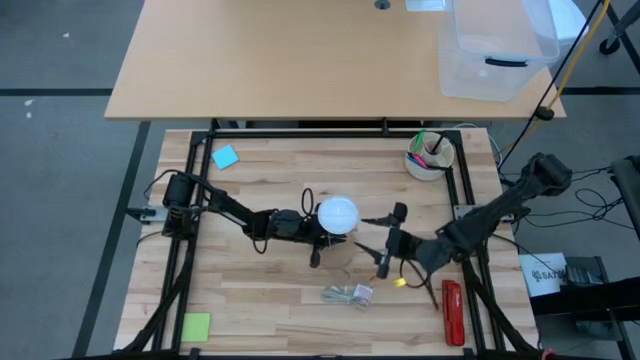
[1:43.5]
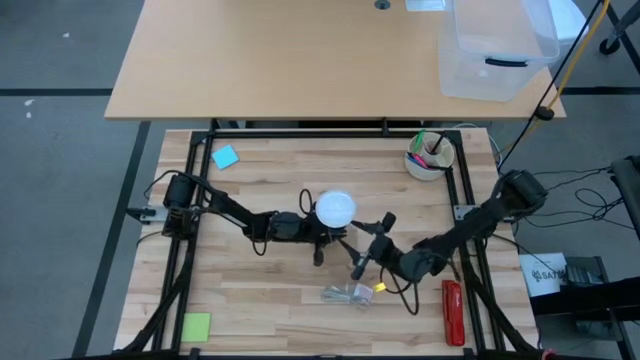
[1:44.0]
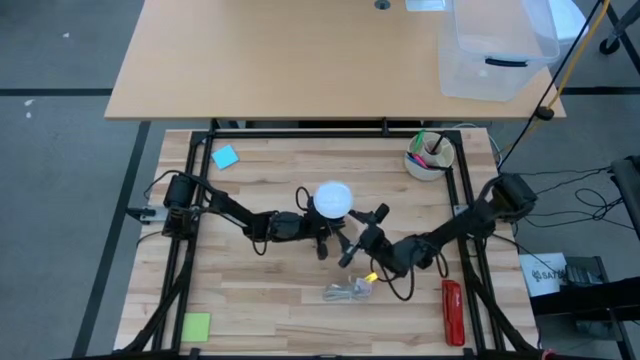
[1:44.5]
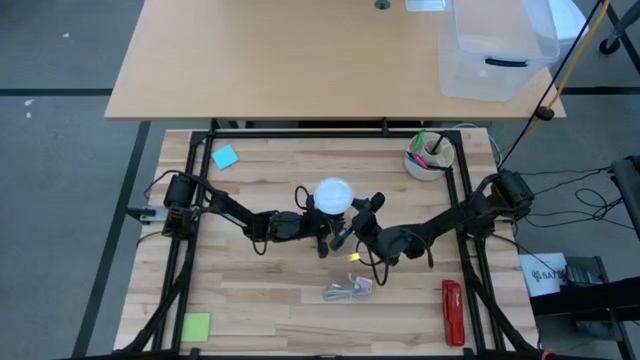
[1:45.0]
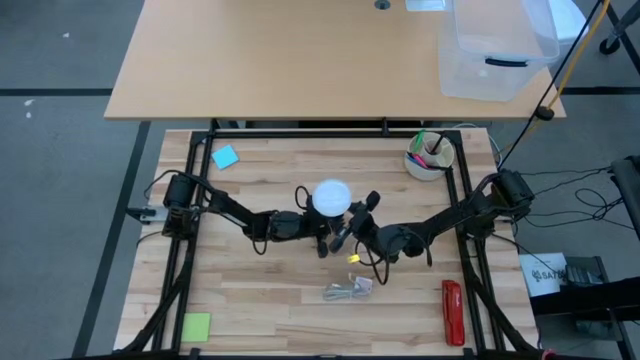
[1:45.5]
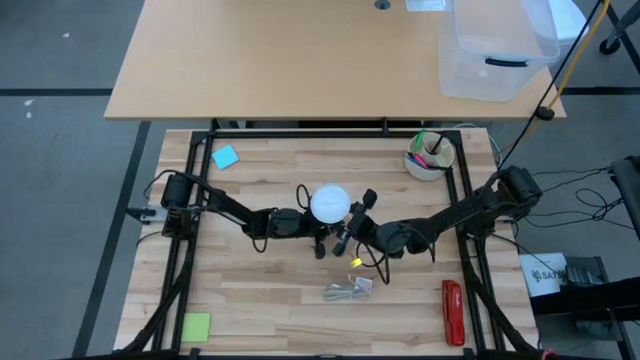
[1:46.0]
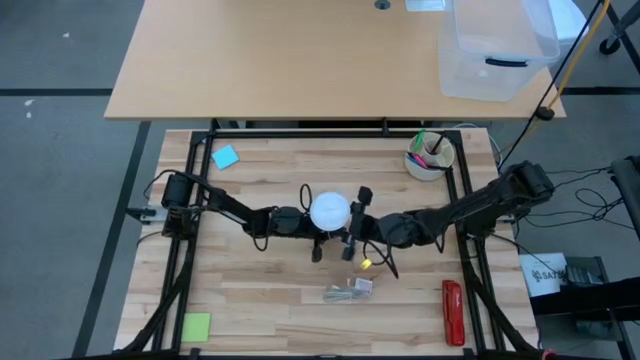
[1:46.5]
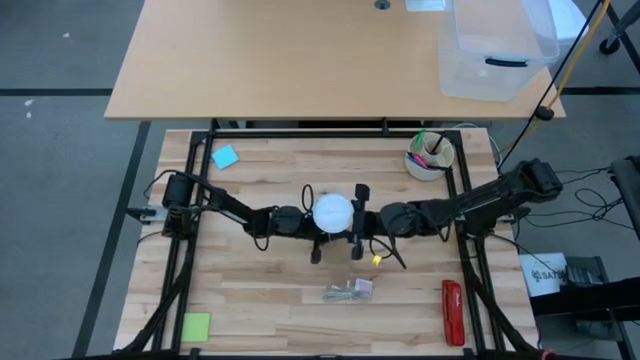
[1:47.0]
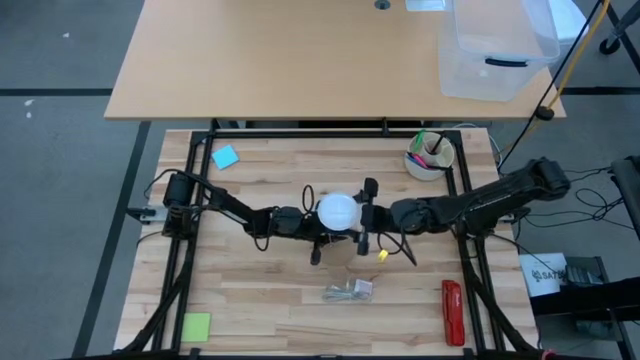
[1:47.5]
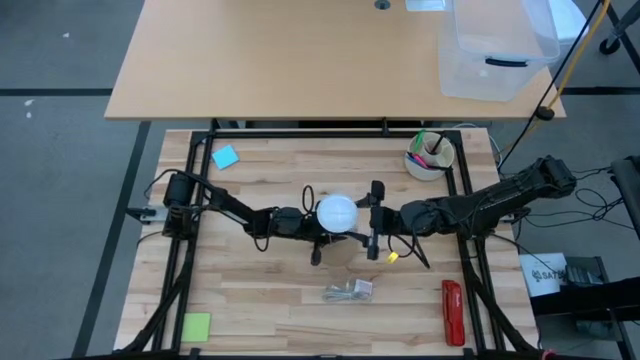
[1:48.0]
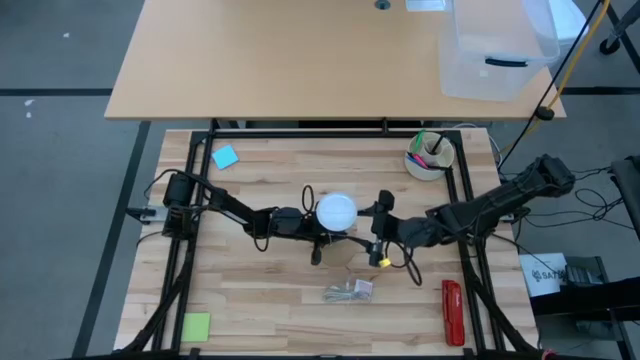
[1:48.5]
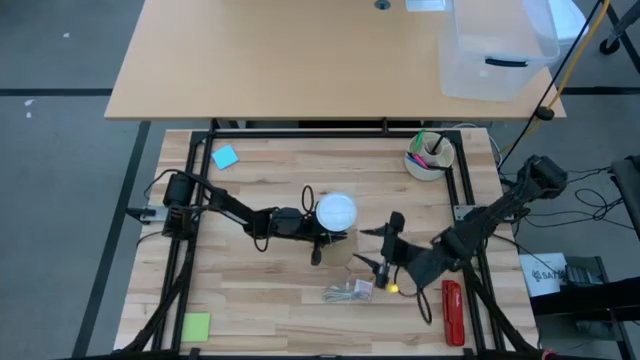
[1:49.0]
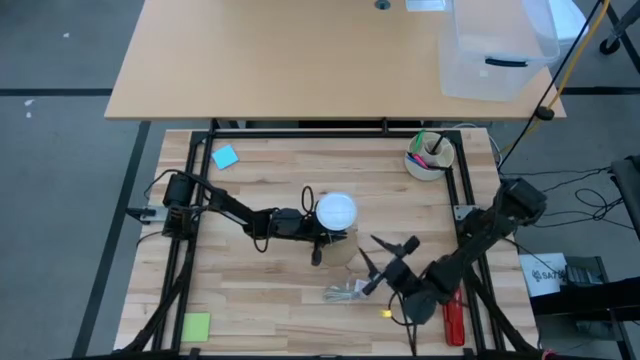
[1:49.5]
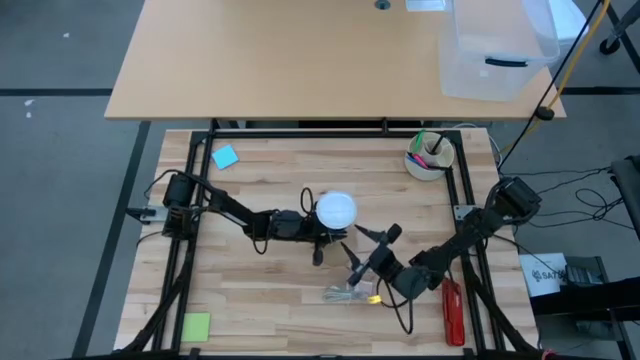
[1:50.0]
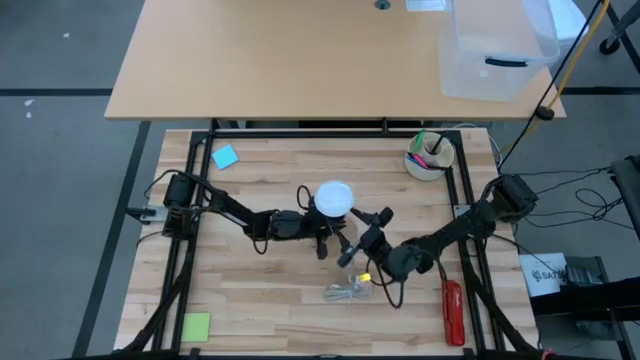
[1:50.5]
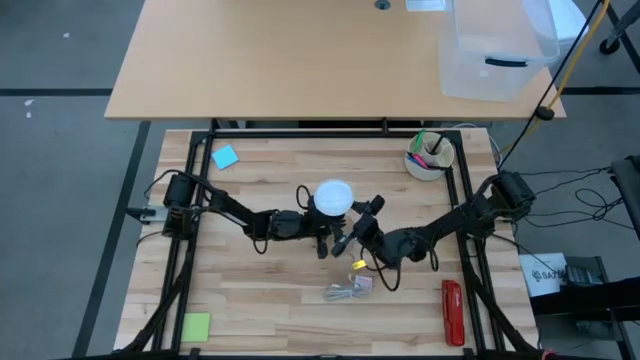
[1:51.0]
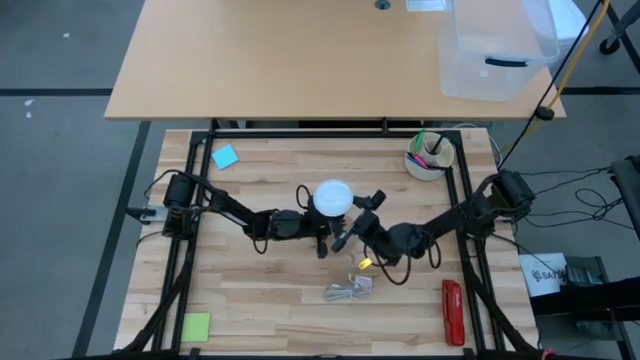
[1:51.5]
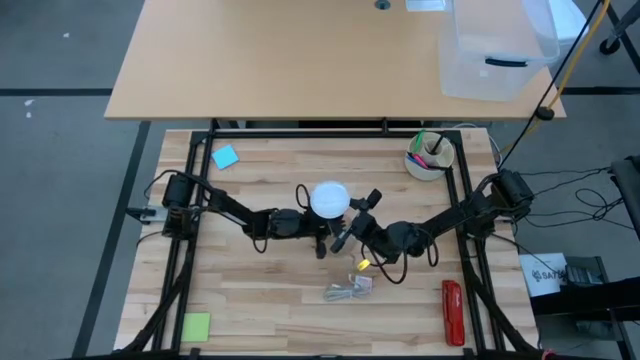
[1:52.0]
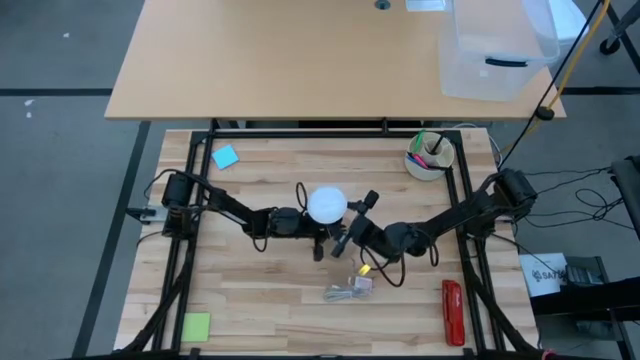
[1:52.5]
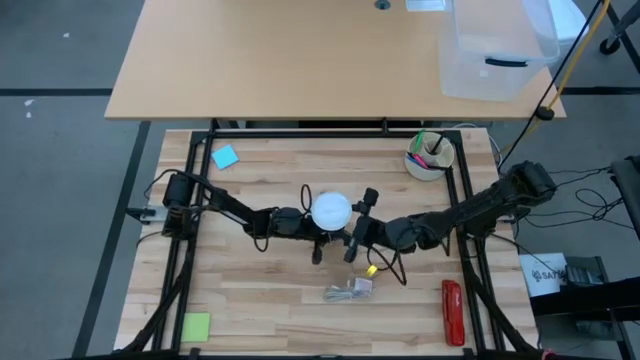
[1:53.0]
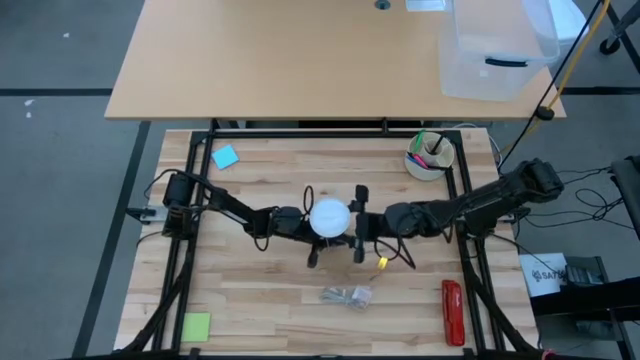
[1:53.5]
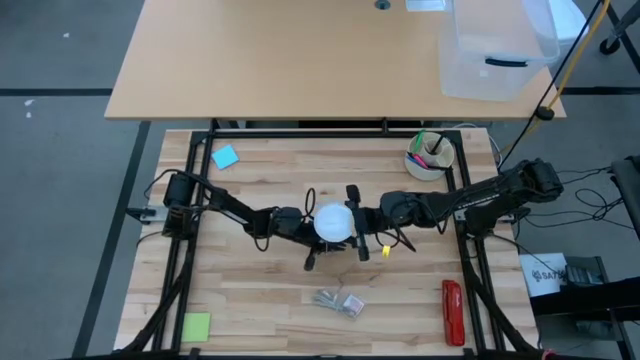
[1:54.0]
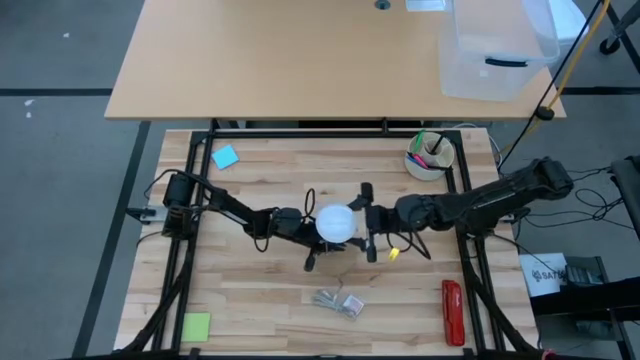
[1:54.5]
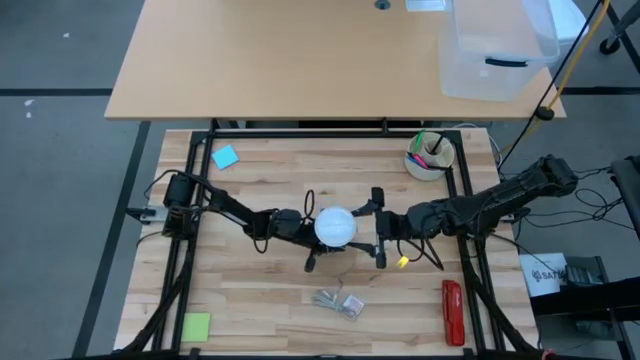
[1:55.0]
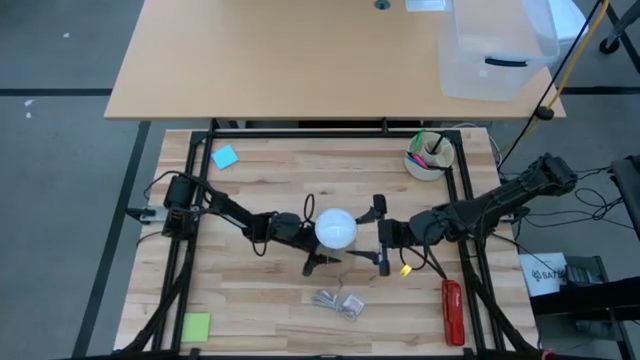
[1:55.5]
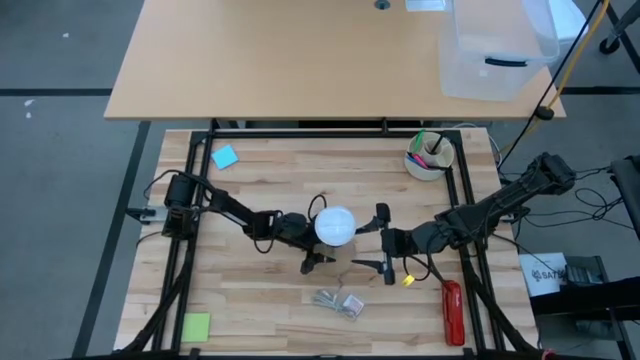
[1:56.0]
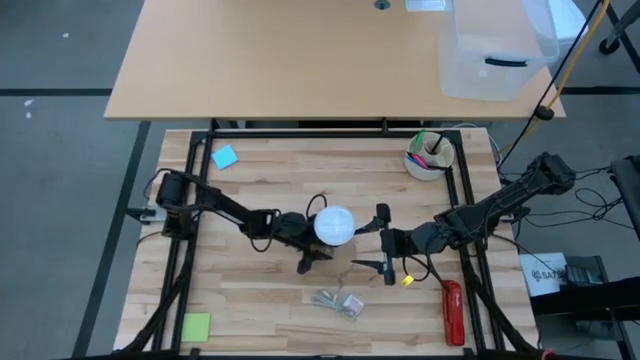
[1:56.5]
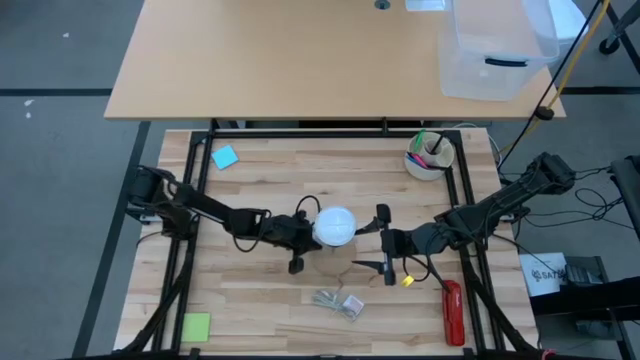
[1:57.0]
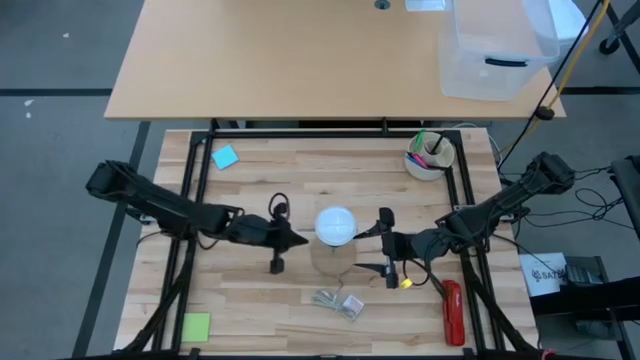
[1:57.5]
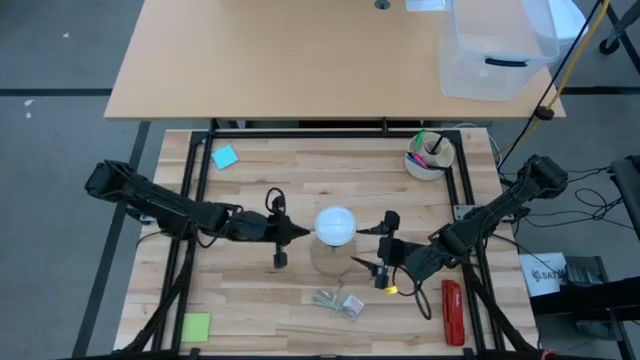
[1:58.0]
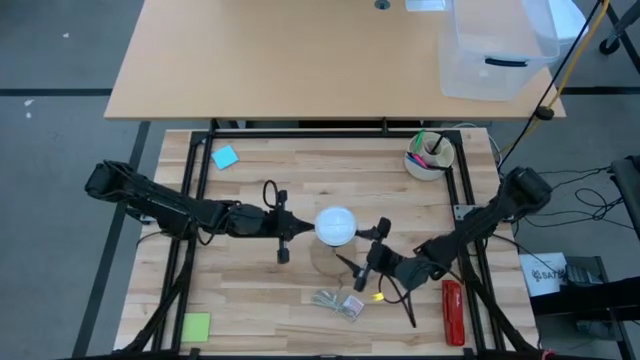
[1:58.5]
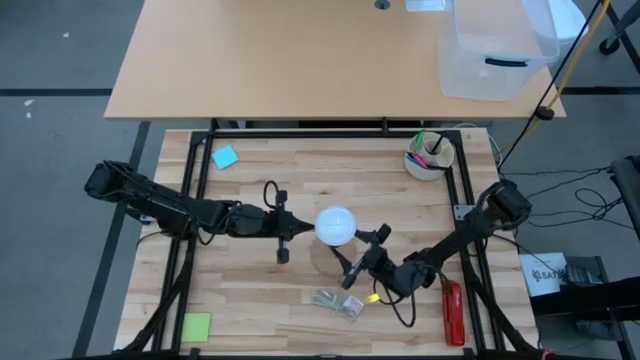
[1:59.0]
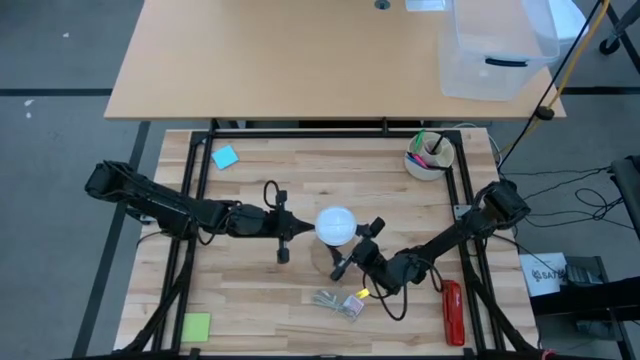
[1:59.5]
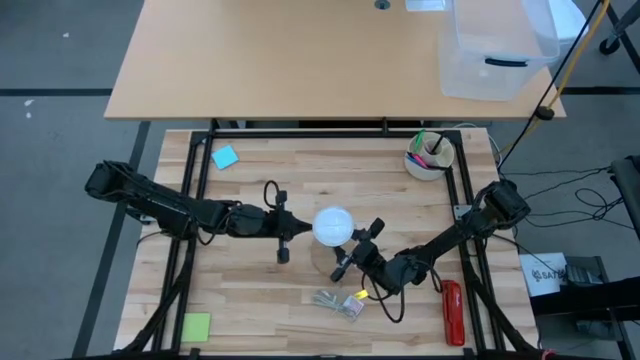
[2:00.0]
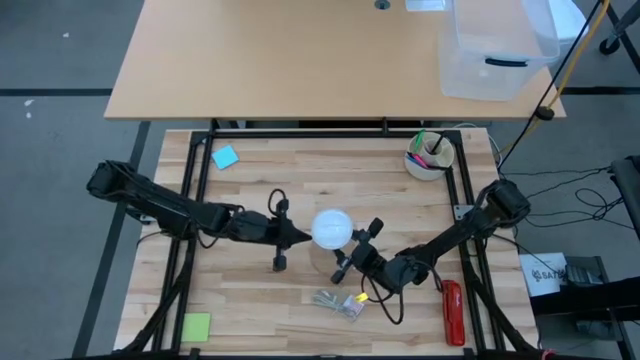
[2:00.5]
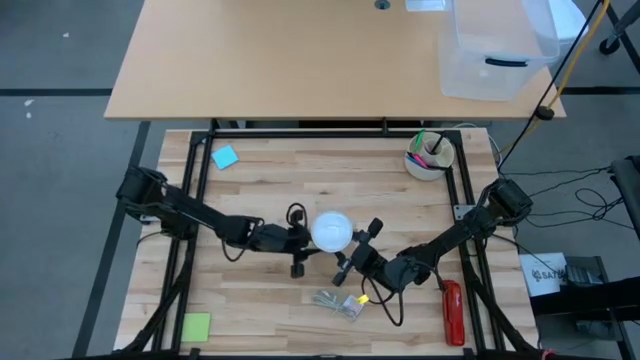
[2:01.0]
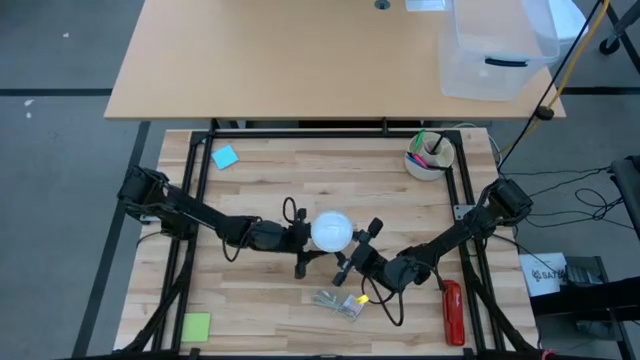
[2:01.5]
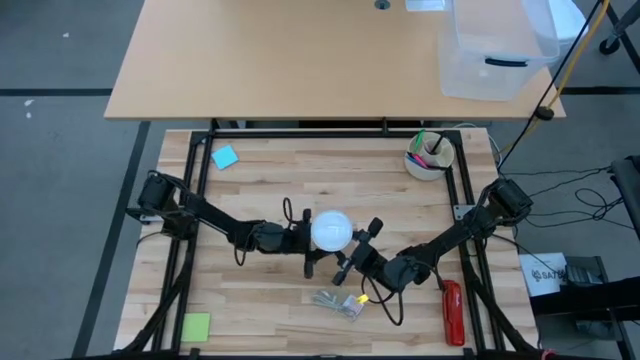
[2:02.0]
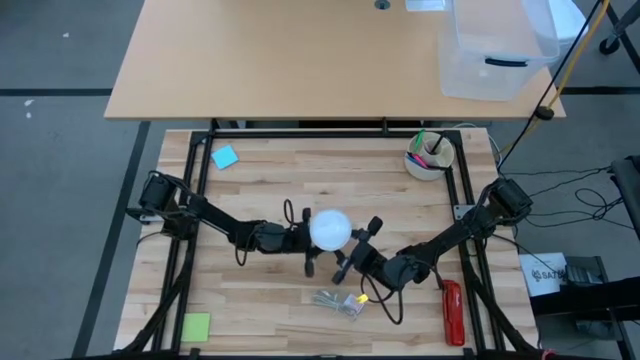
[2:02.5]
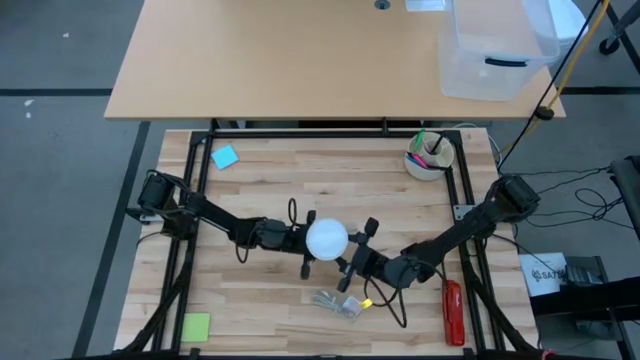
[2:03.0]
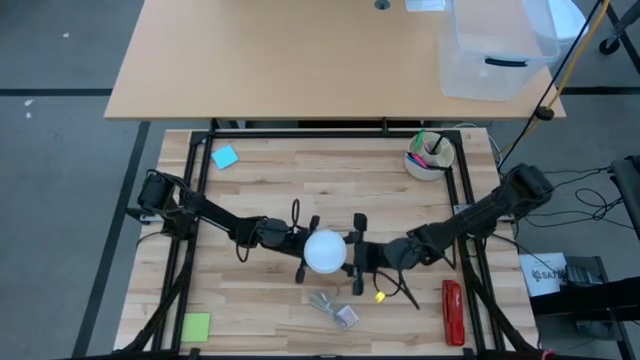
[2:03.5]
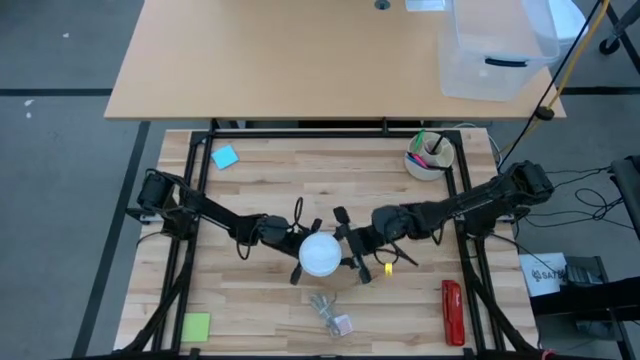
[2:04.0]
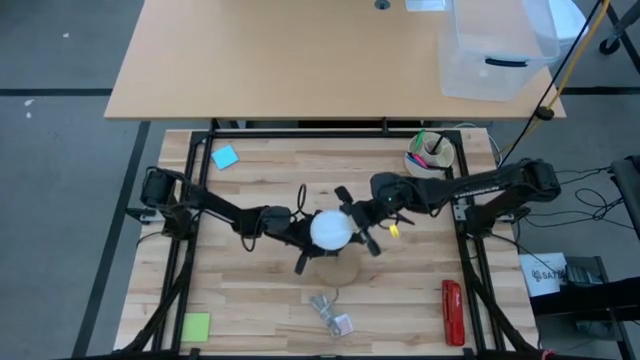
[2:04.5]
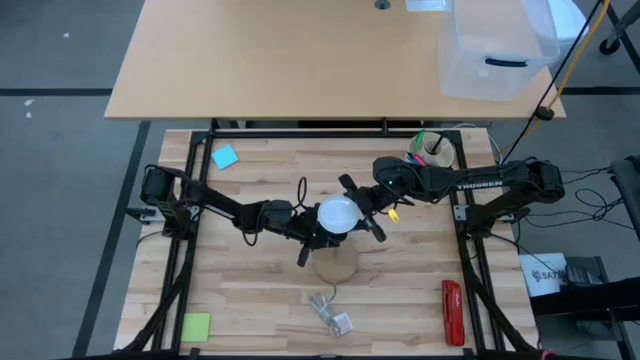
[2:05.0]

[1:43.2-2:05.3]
Task: Screw lightbulb
Remove the lightbulb from the lamp
